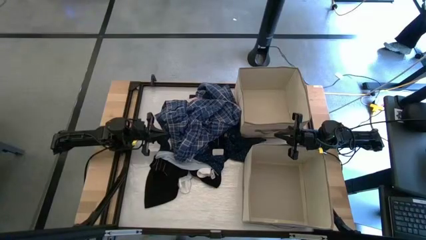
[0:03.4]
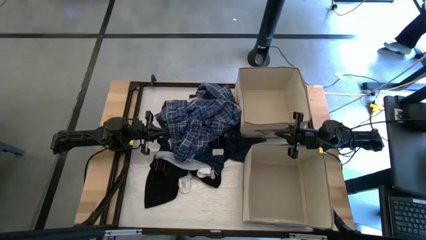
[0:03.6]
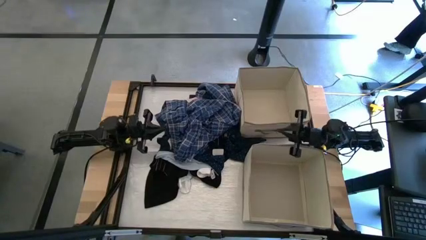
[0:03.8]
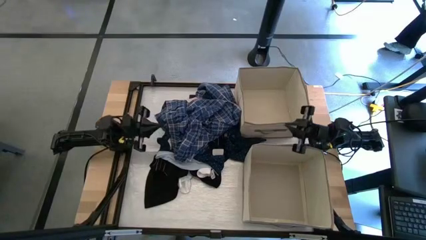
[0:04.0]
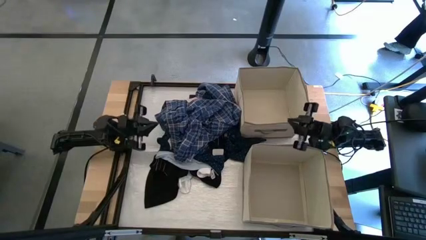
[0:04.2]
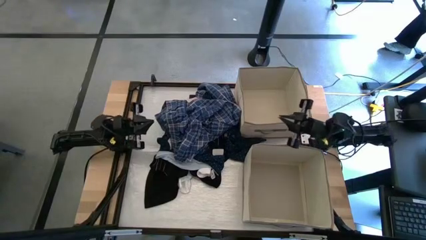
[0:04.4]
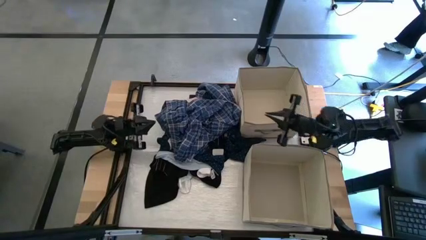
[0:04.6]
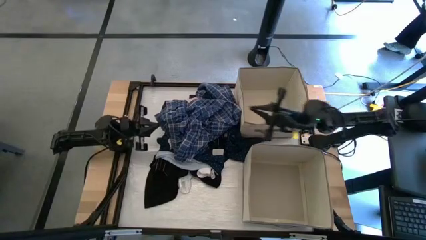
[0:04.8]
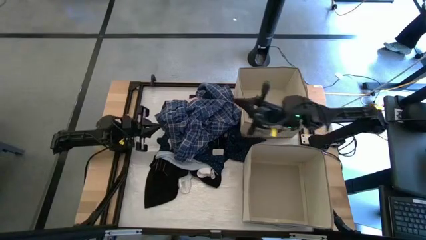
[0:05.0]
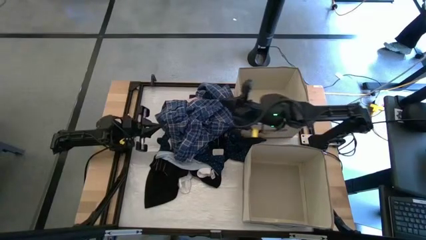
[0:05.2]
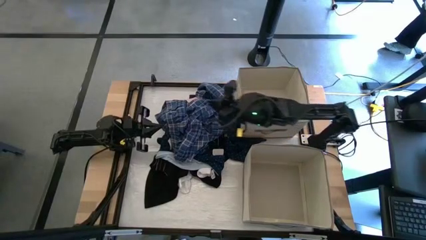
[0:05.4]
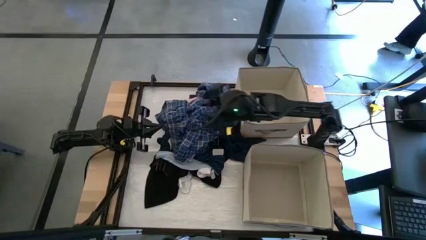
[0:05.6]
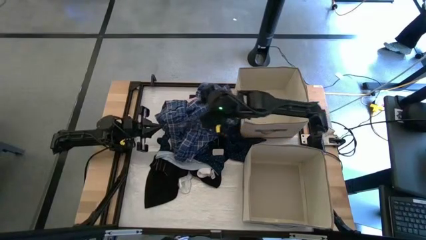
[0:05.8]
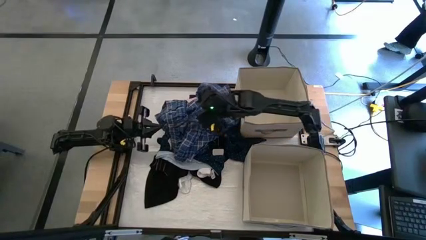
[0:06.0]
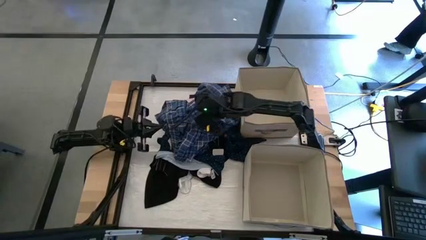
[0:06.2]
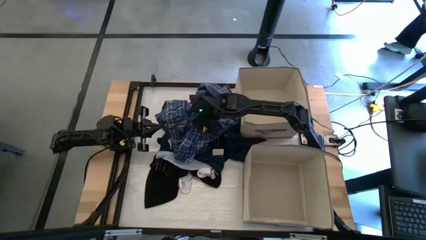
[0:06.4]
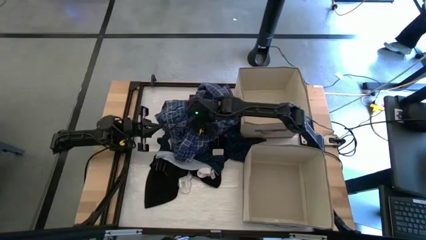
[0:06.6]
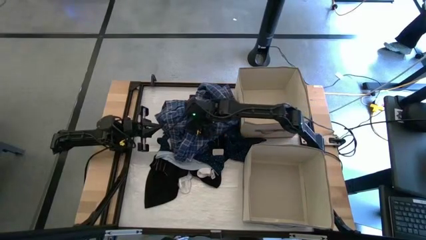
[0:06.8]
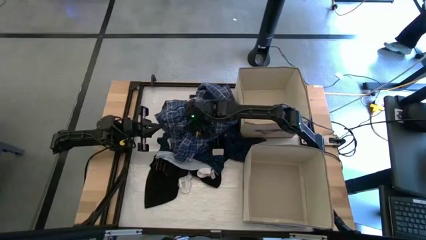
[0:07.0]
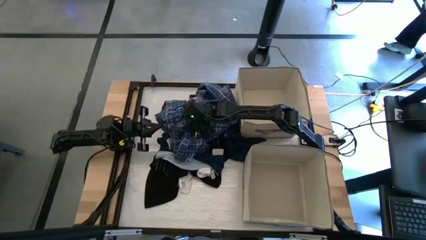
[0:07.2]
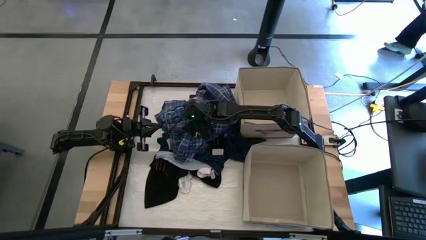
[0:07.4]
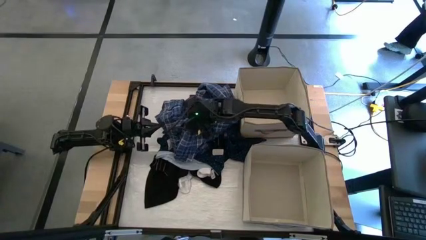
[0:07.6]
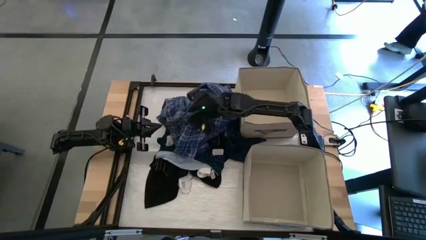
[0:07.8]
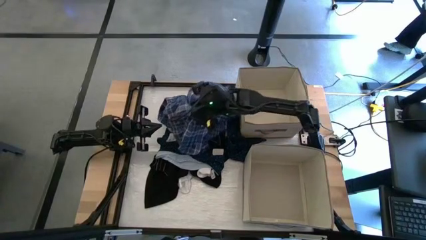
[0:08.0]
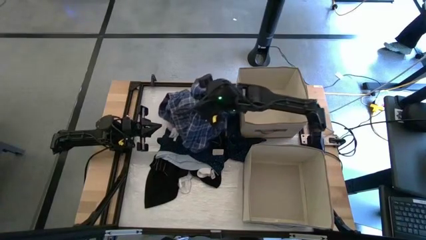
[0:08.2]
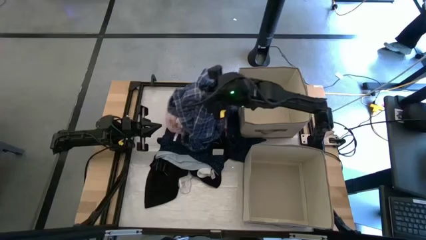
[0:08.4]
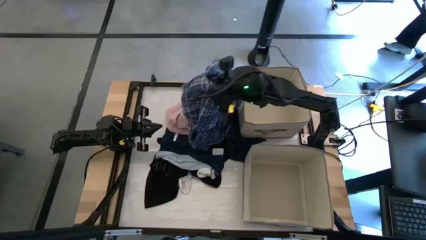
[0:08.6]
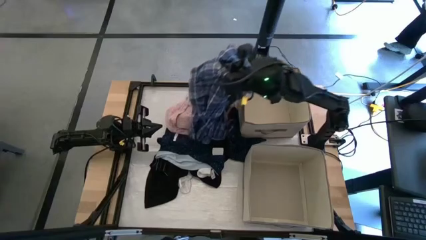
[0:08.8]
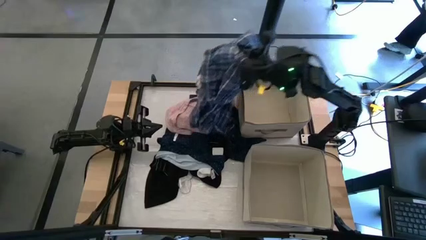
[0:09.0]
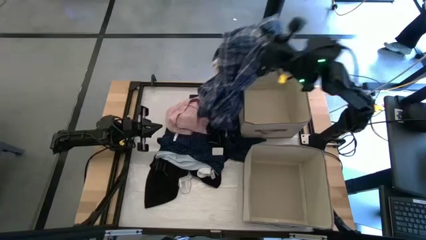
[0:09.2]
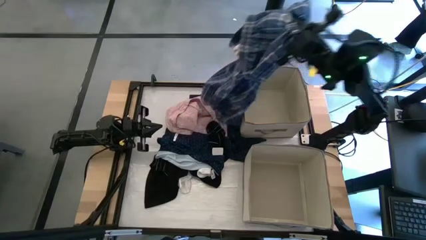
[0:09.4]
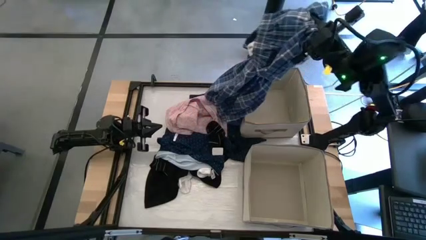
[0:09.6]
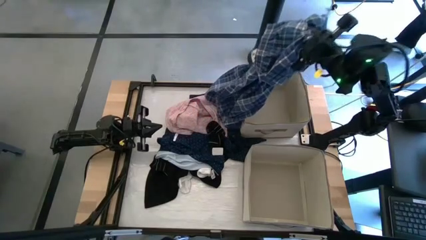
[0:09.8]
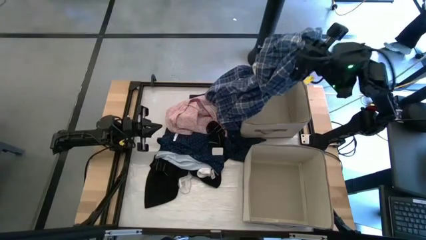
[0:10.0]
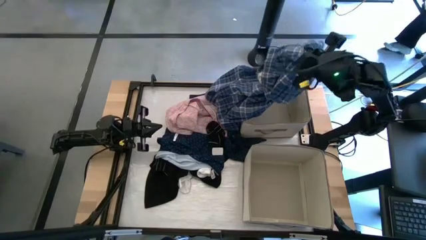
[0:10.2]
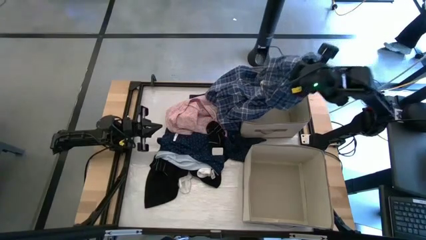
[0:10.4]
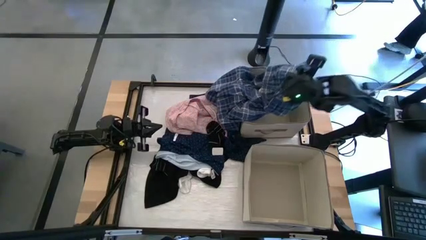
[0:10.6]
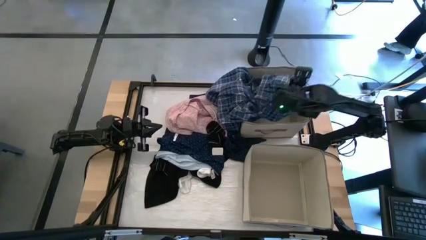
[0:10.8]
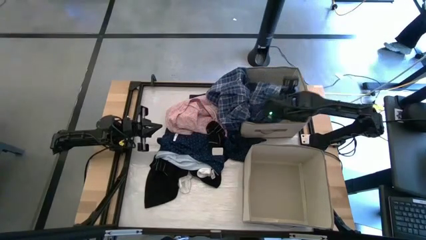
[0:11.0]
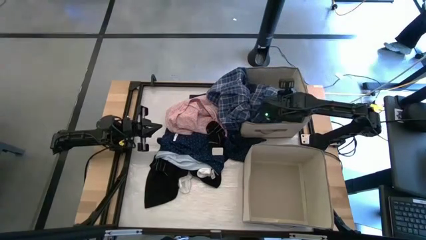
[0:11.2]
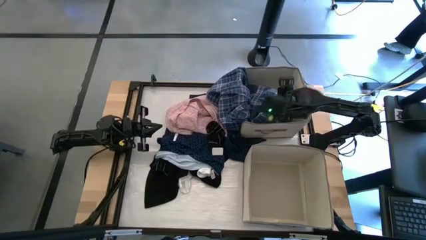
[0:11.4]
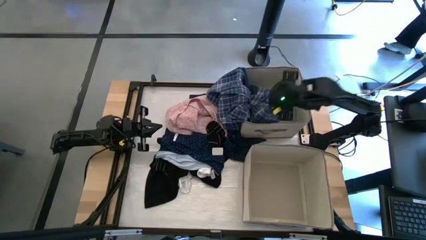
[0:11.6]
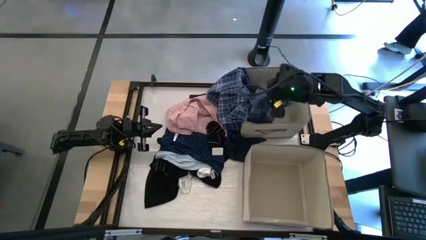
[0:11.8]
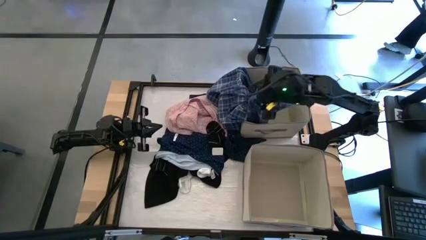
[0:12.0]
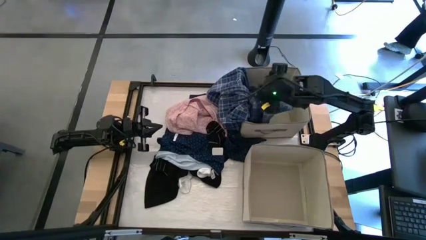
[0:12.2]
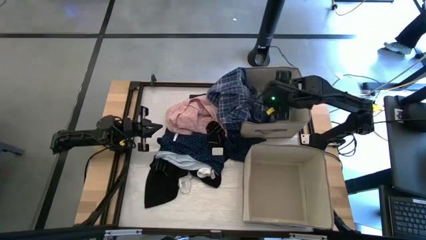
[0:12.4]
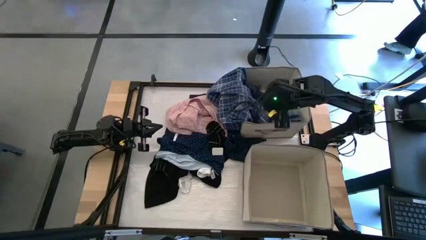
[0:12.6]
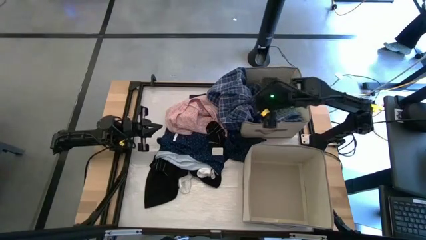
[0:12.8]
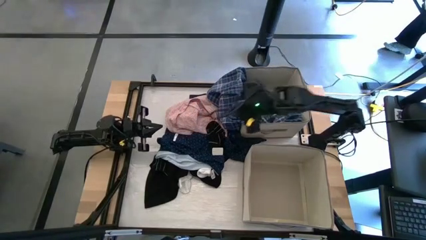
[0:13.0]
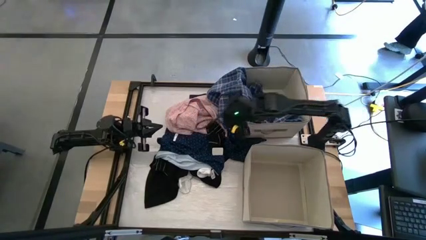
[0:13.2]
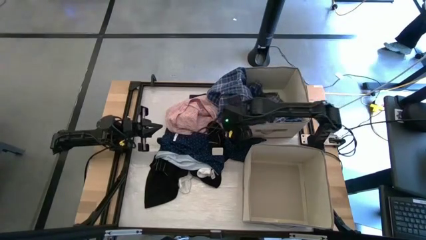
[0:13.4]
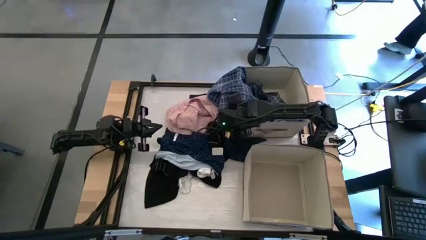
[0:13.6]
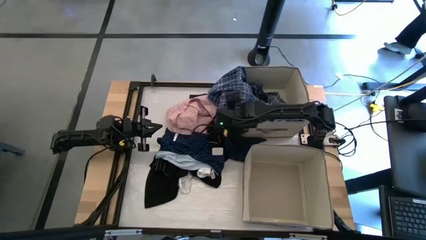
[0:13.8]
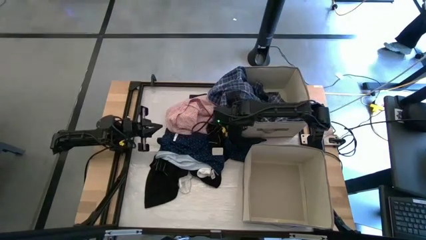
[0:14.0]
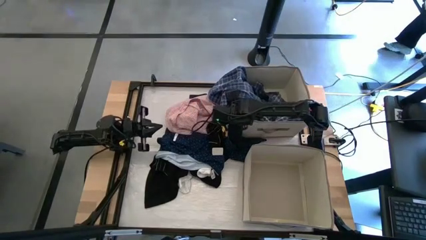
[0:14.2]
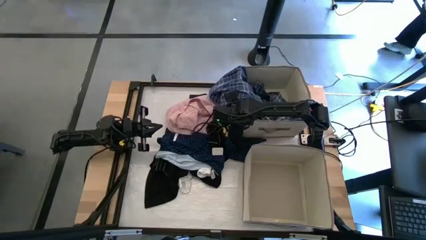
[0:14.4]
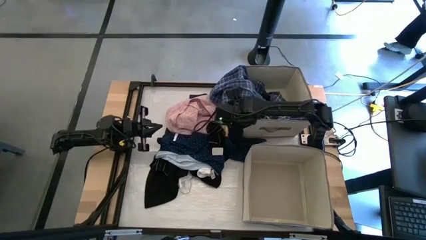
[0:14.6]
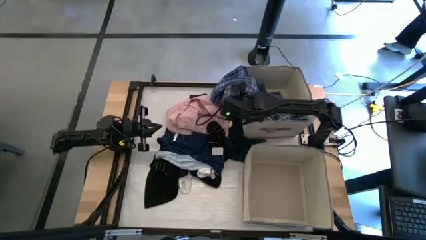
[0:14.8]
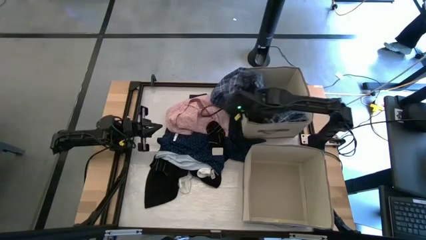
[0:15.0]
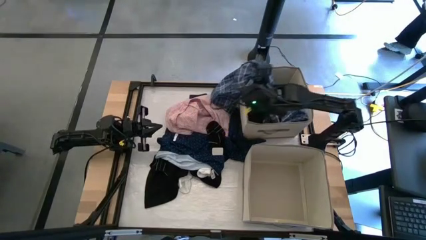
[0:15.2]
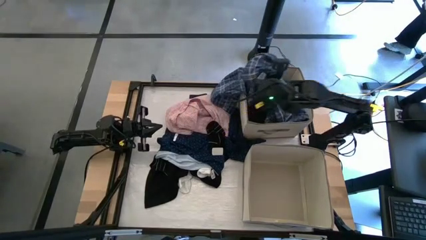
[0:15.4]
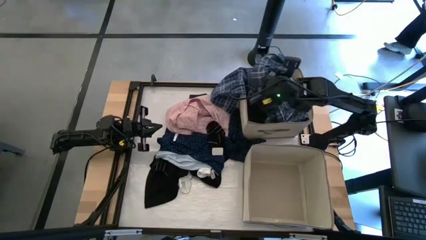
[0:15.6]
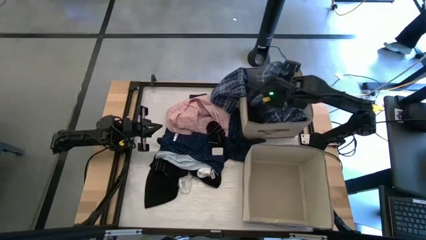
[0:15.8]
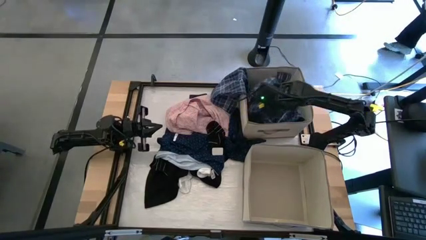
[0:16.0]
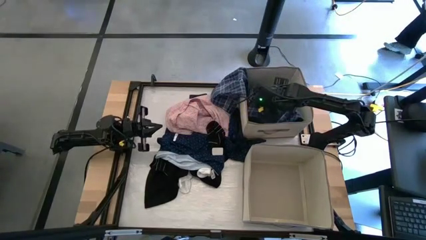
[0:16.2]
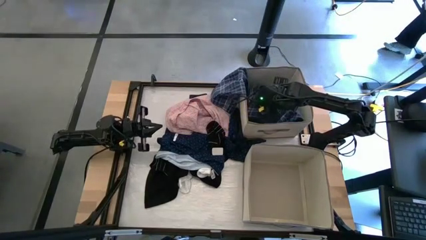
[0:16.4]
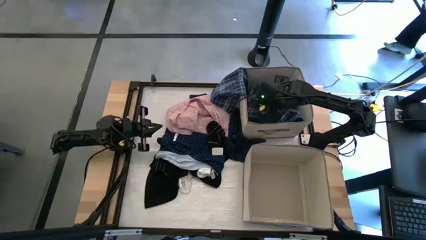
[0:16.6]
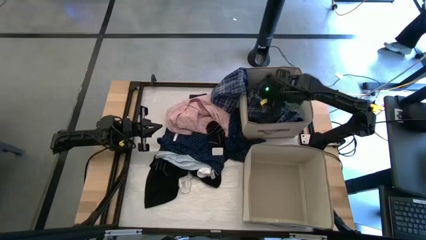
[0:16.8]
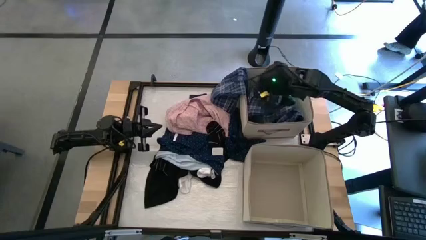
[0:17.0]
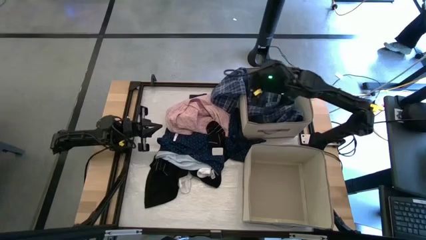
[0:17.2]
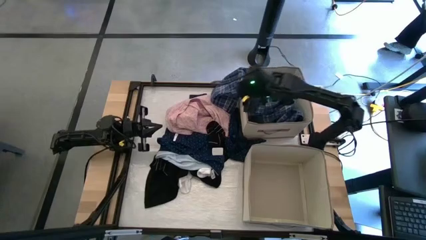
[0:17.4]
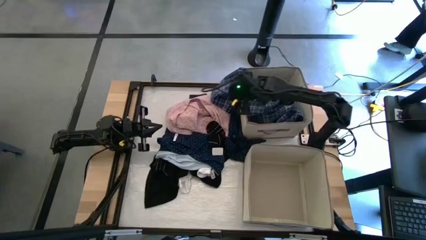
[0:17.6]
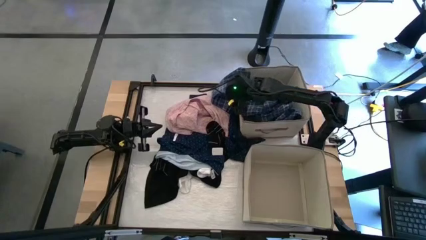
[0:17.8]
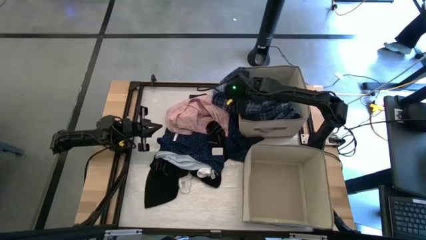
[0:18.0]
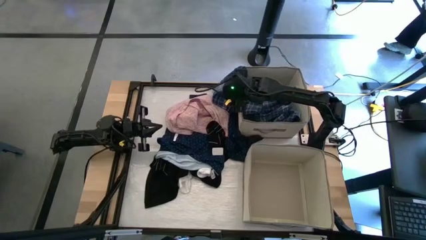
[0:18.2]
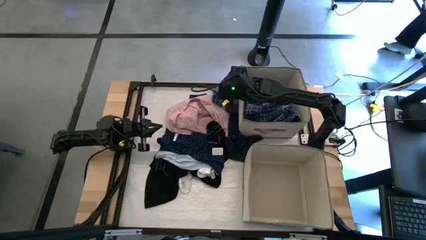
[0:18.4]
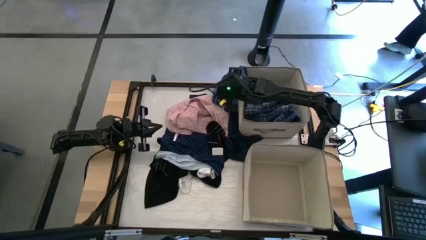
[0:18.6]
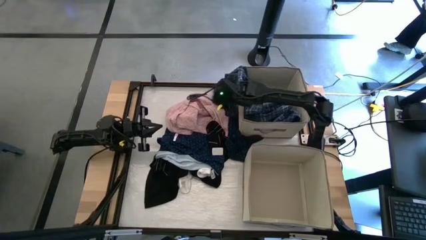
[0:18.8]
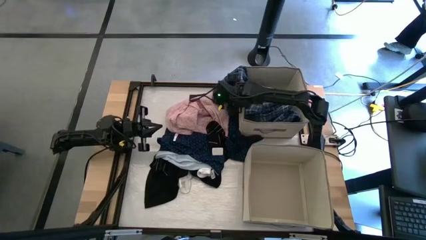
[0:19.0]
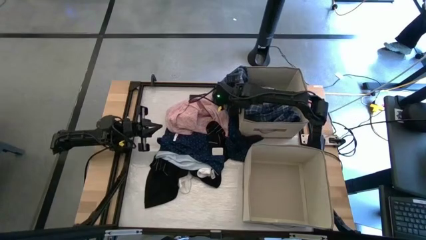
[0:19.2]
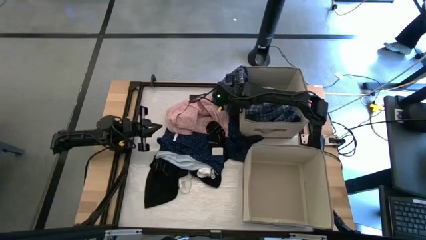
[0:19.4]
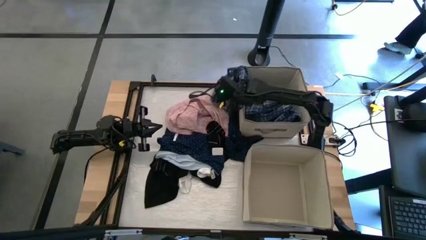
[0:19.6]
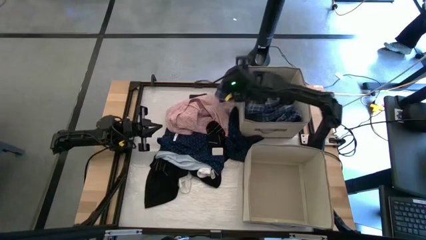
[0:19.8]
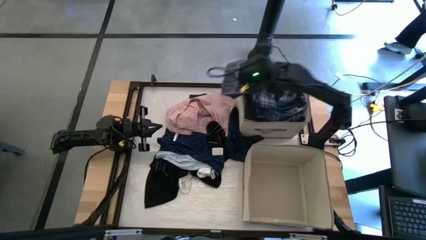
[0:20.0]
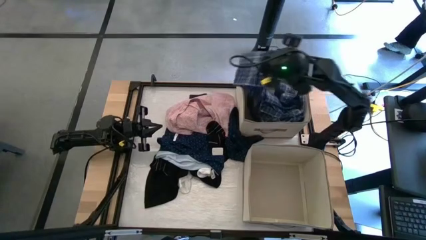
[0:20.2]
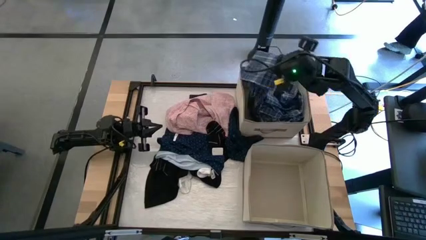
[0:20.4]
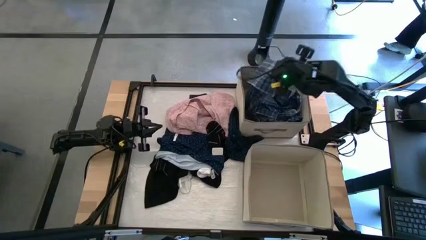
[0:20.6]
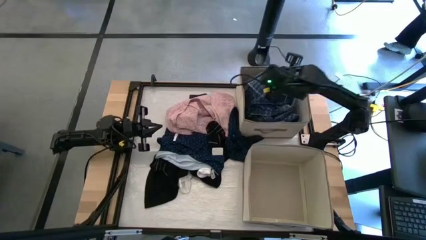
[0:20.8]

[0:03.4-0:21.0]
Task: Sort clothes
Put the blue checkered polo into the top laundry organizer
